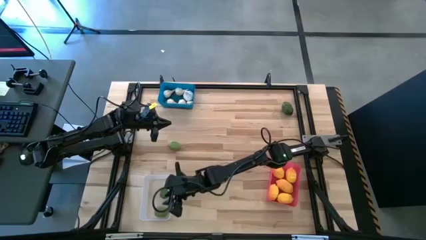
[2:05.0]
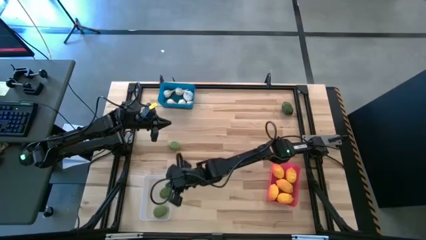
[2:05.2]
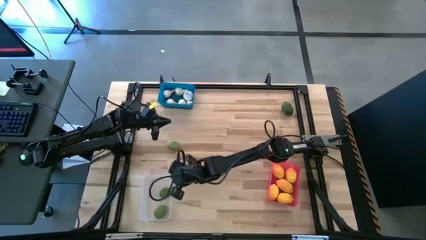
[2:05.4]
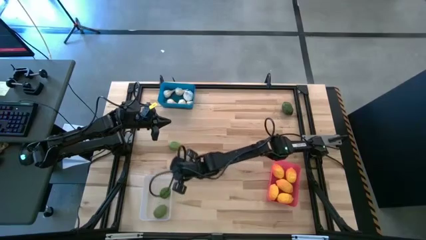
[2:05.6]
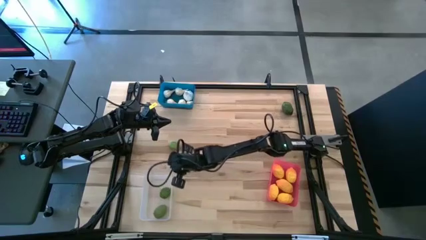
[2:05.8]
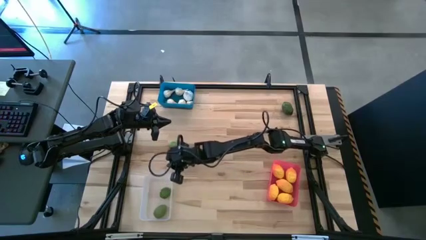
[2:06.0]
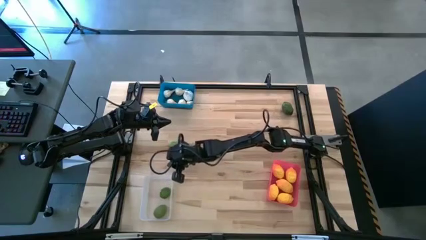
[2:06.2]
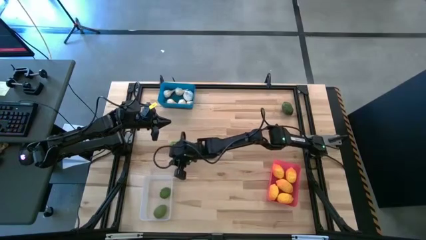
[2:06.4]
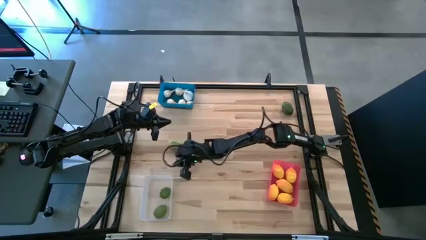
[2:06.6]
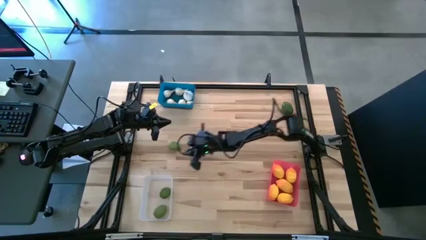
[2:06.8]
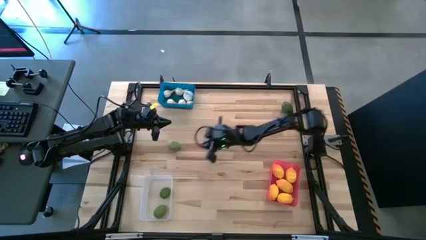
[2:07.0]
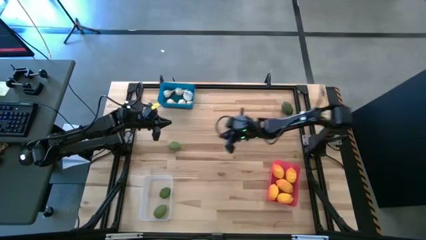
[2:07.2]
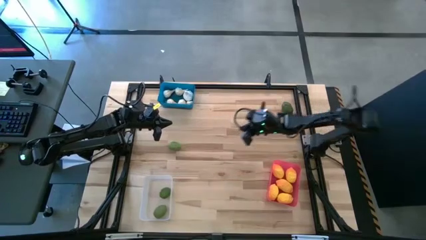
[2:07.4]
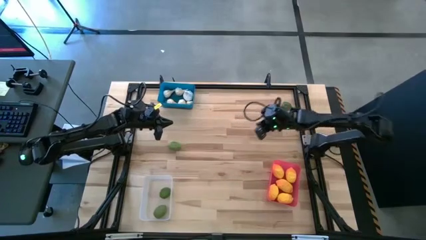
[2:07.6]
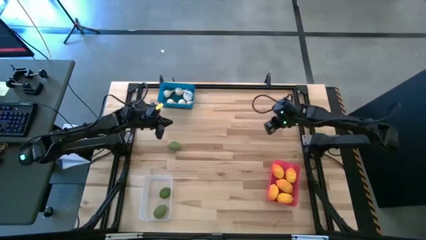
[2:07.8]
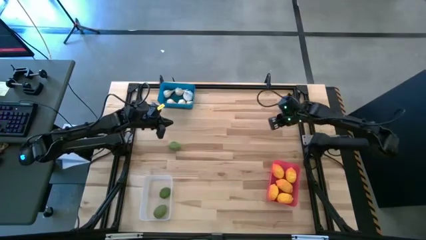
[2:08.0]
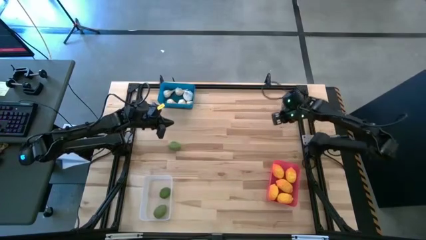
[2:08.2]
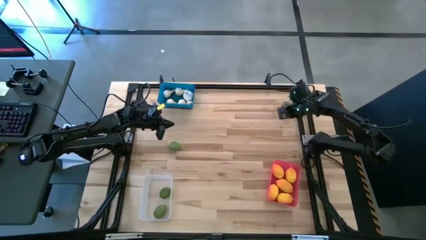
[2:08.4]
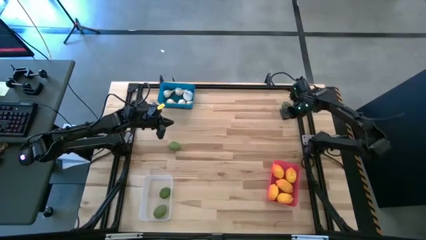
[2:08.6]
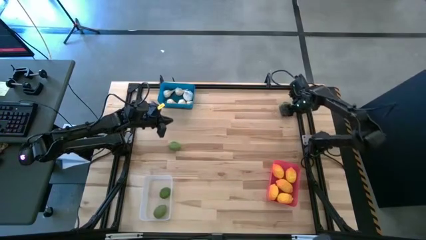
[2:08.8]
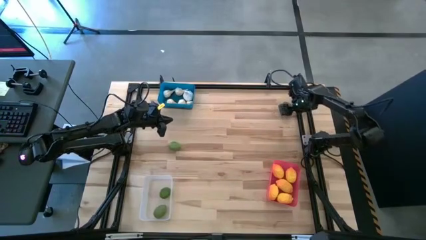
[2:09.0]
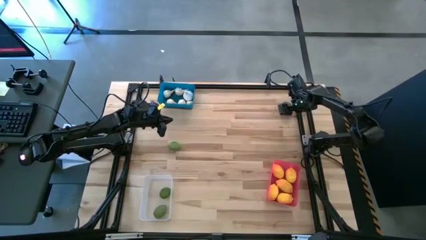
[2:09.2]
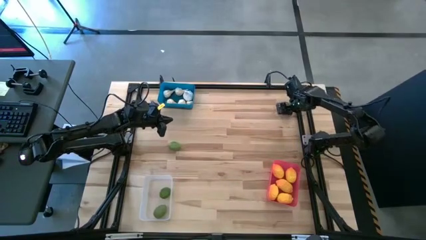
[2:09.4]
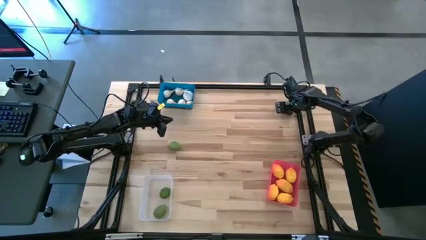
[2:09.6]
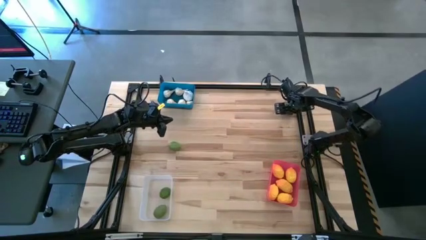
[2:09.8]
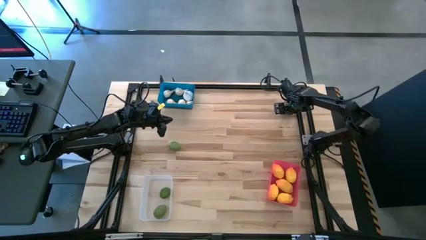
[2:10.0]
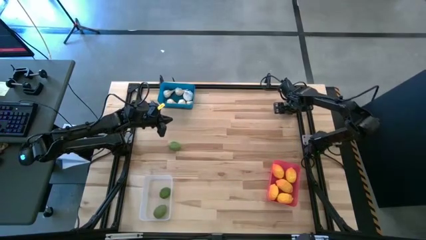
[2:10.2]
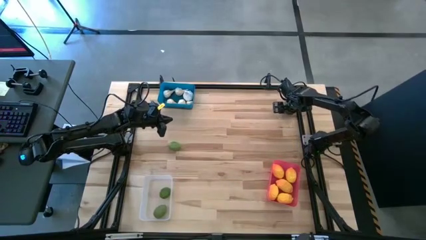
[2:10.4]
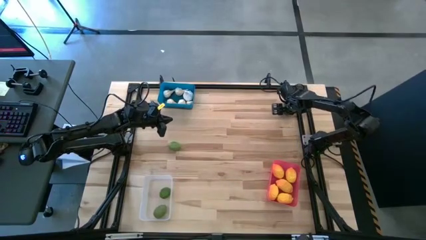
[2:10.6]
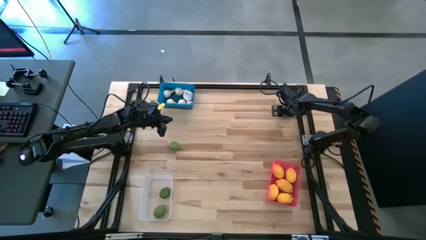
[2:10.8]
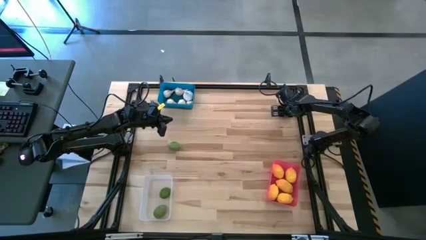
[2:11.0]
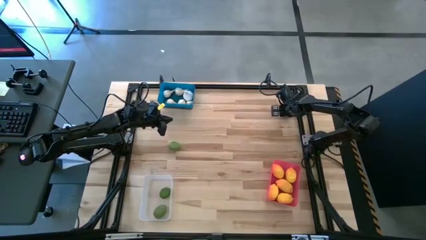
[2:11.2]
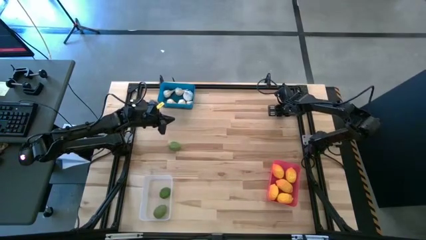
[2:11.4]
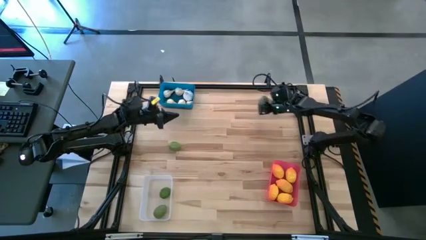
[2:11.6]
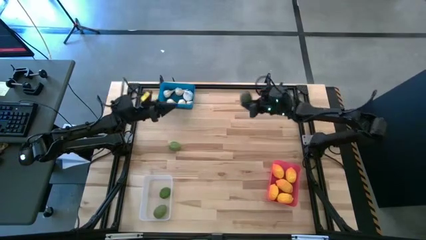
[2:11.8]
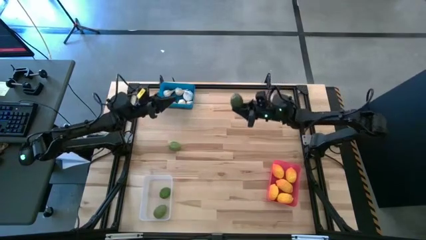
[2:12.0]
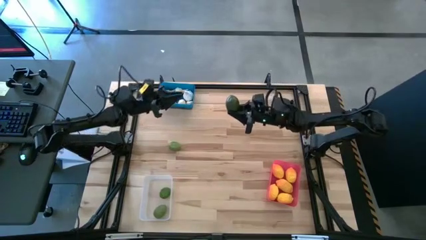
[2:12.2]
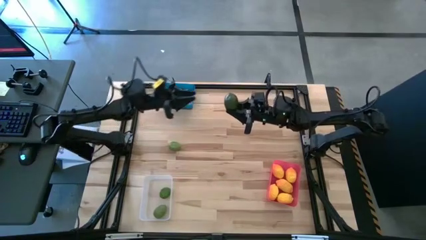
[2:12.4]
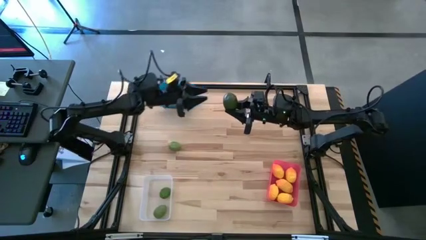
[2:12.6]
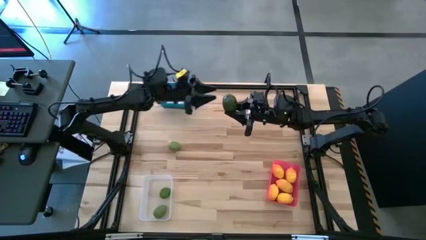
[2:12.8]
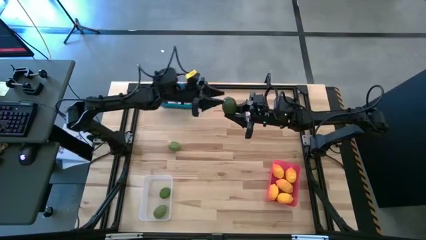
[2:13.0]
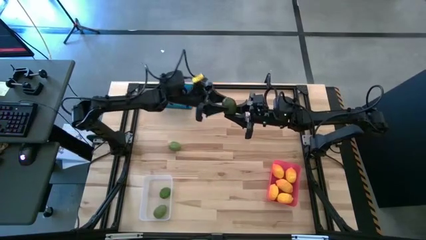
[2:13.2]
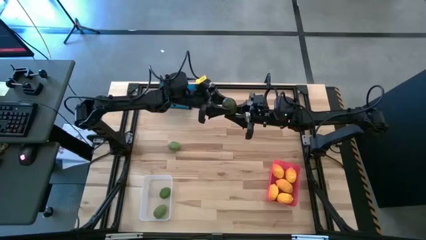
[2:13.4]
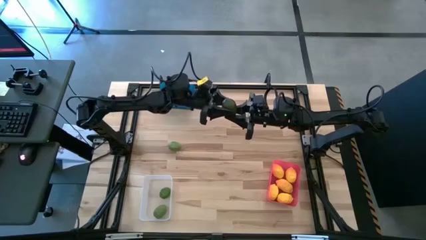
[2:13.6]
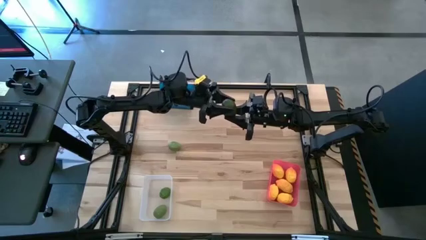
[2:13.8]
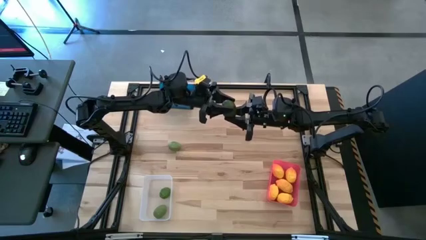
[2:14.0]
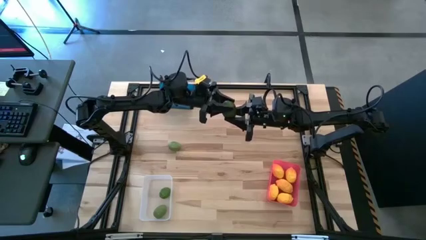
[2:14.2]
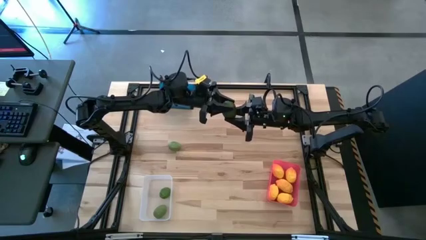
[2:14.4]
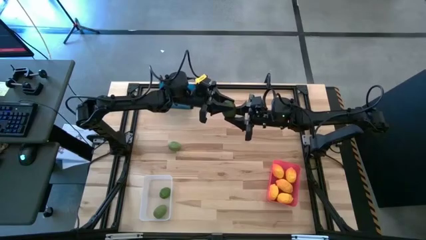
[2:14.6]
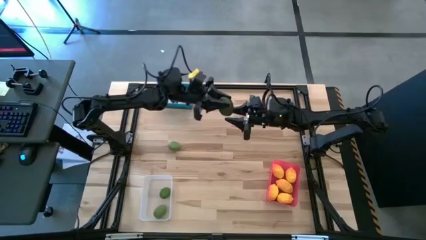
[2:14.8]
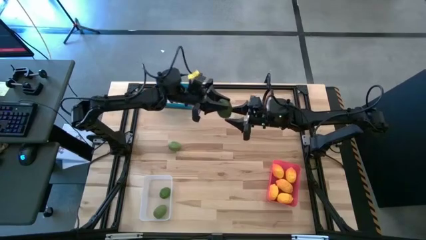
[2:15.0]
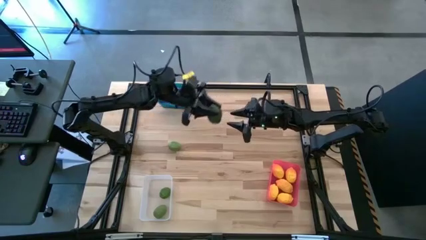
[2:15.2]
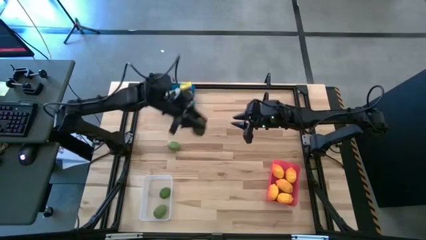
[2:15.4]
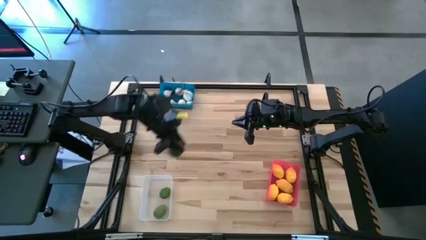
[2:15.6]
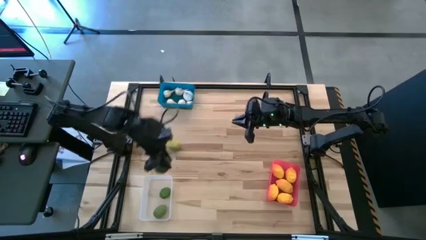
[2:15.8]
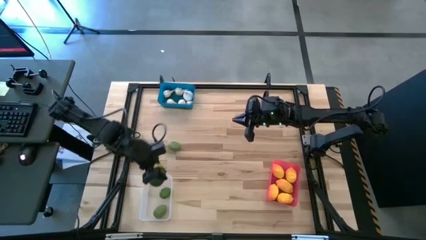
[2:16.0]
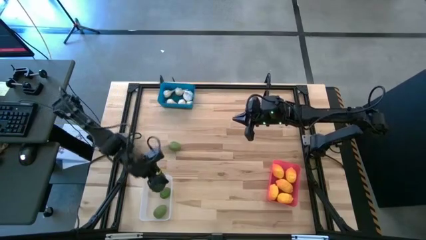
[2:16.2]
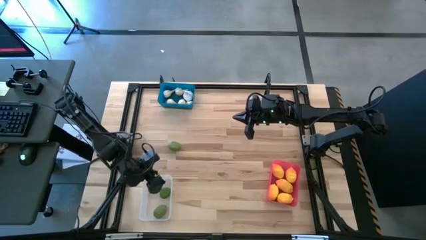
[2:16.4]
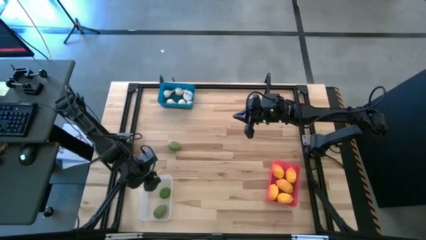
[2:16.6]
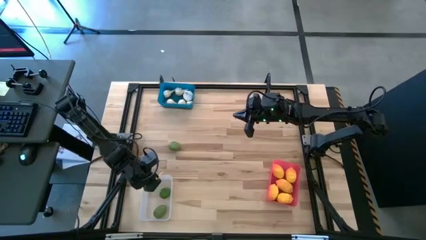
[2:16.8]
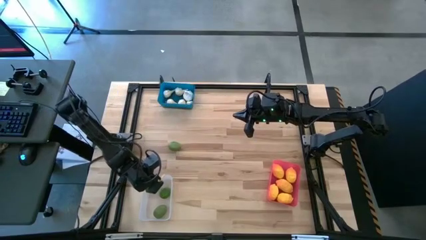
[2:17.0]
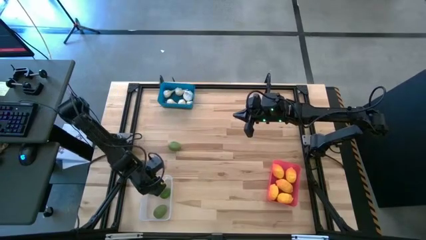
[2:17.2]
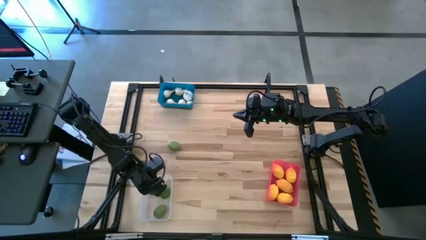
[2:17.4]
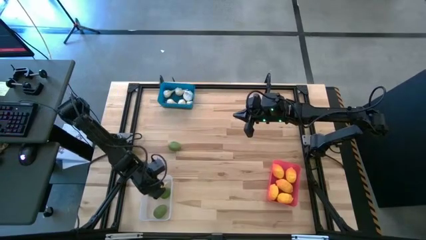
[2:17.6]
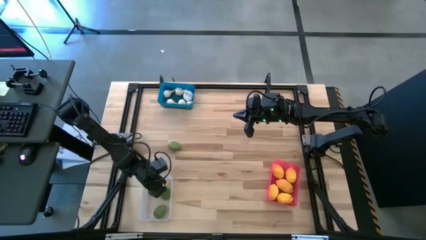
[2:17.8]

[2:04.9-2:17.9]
Task: Sort produce into baskets
Put the lime into the transparent bin

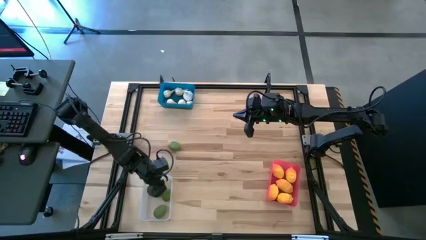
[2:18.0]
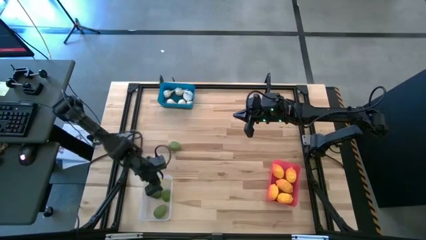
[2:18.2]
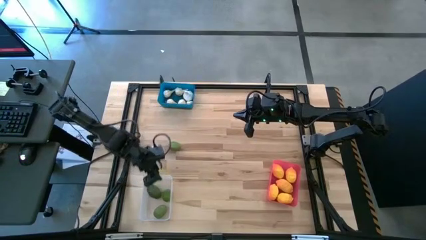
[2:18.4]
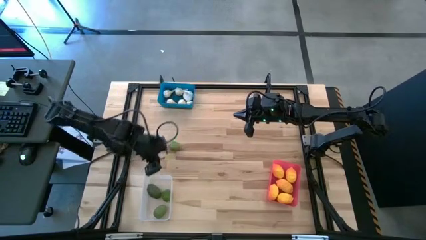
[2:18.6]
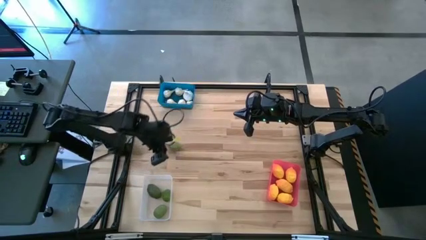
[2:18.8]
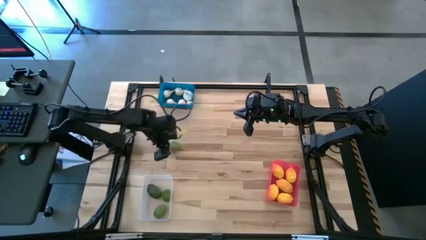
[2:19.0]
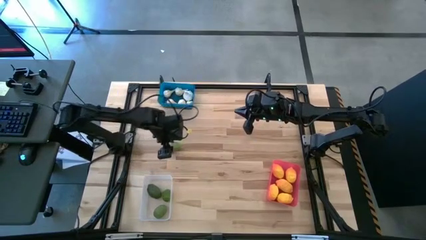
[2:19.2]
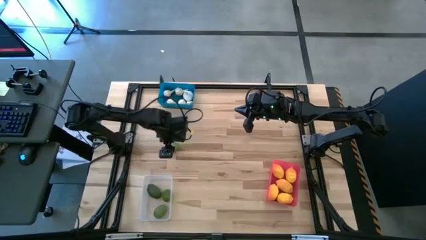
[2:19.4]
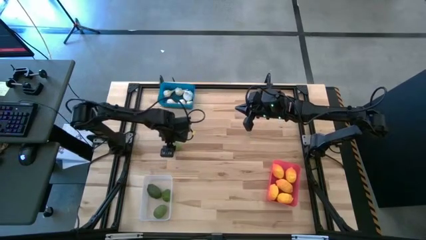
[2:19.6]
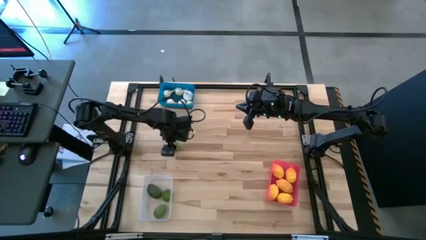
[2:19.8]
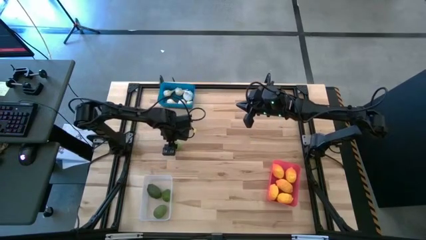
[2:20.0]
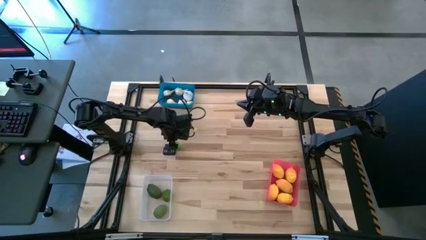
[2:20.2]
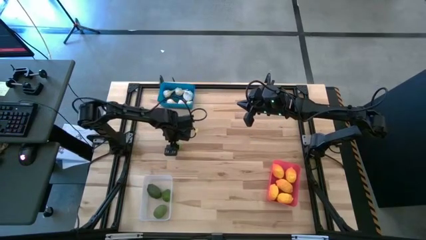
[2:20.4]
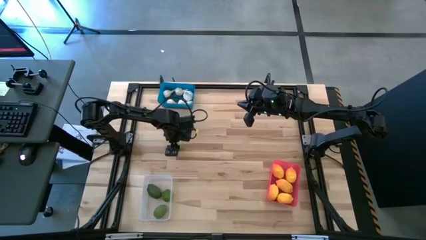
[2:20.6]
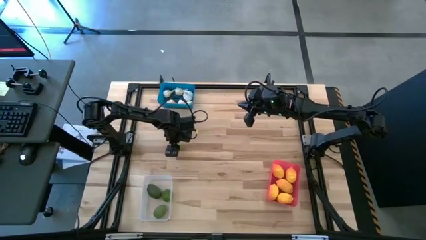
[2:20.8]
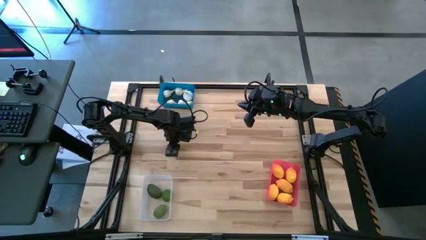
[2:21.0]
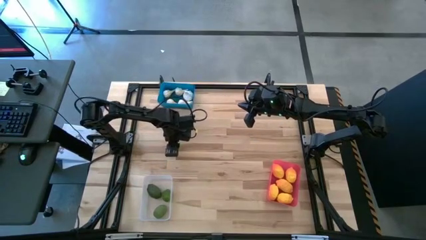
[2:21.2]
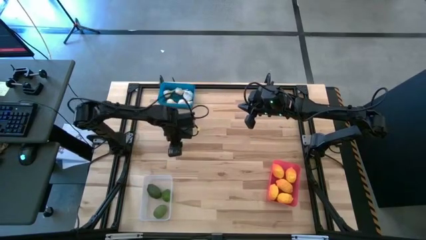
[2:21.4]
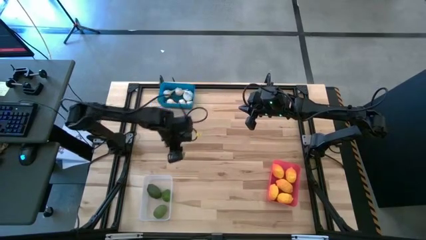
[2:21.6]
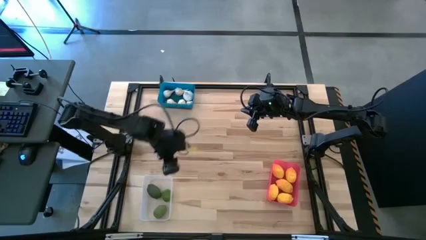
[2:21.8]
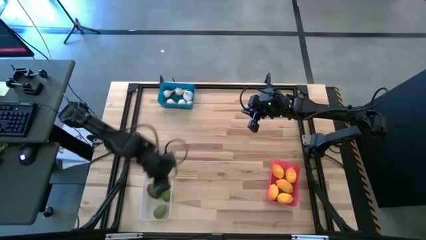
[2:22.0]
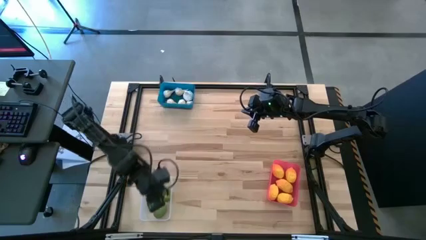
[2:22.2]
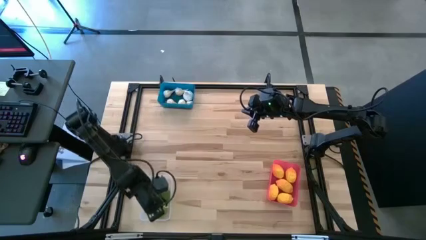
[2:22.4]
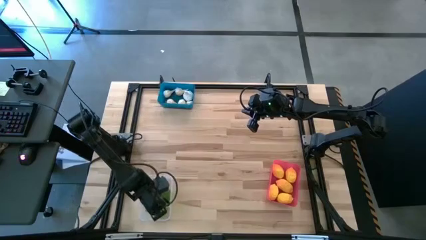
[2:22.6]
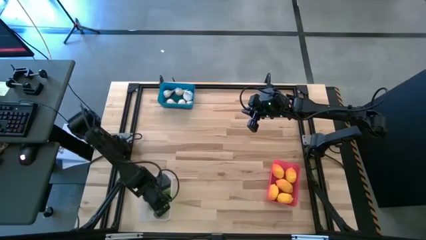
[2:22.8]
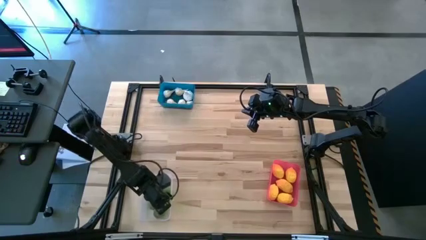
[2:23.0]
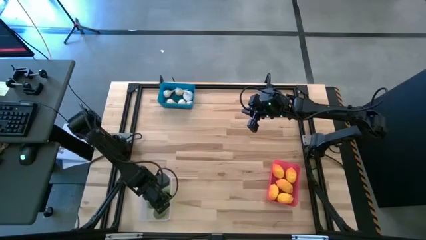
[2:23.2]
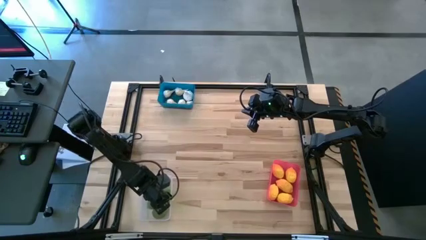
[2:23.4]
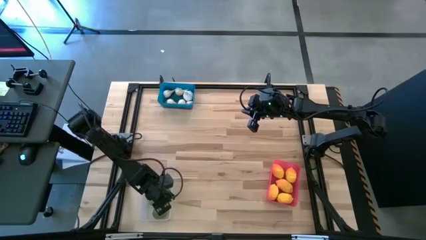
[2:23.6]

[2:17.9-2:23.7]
Put the lime into the transparent bin
